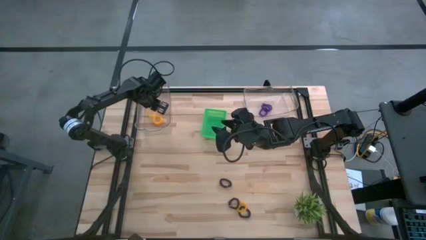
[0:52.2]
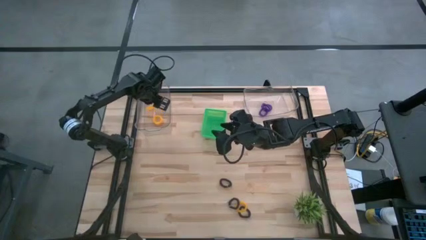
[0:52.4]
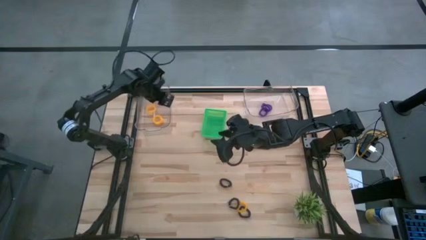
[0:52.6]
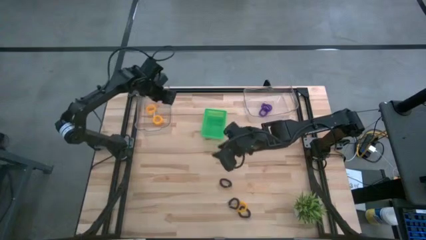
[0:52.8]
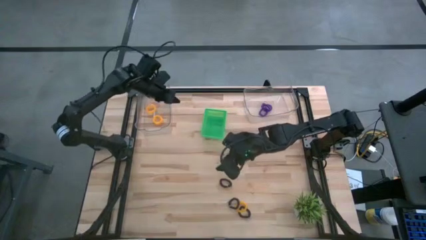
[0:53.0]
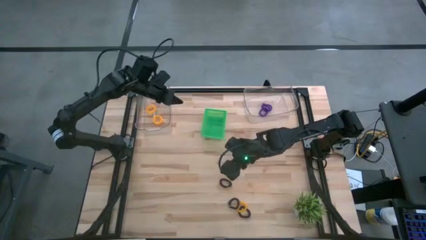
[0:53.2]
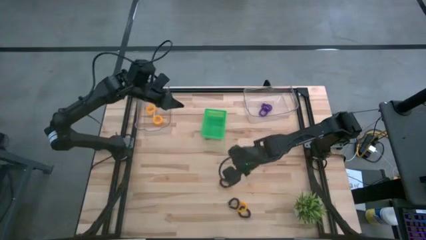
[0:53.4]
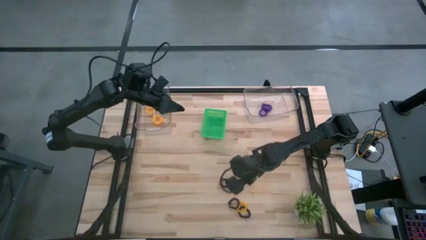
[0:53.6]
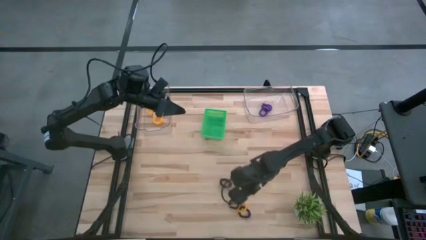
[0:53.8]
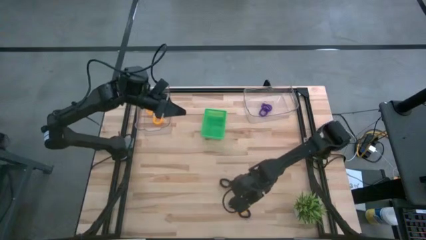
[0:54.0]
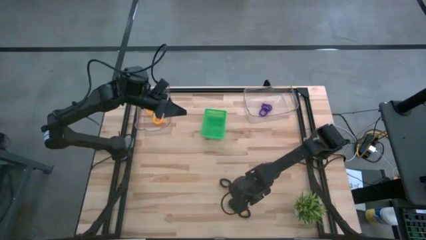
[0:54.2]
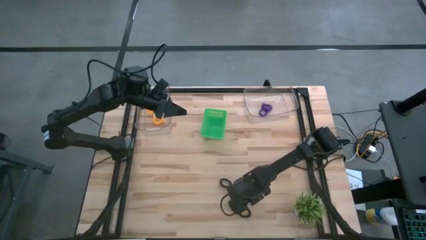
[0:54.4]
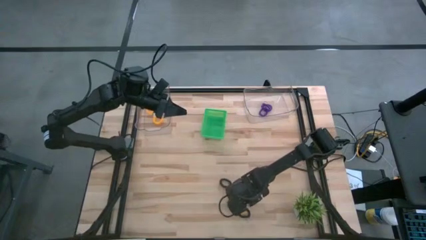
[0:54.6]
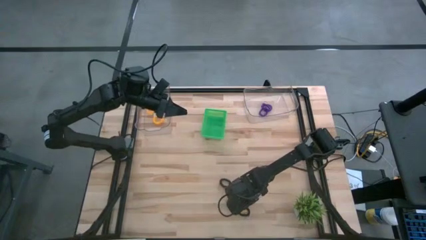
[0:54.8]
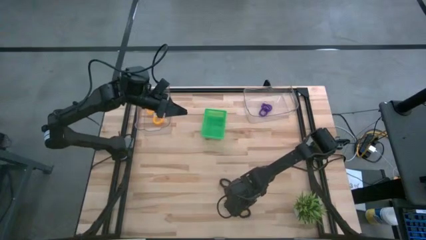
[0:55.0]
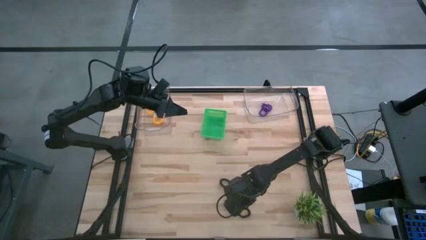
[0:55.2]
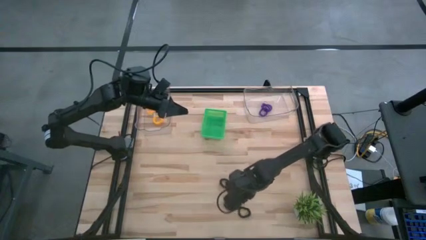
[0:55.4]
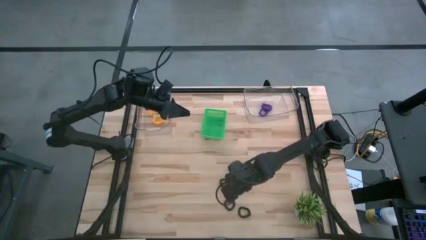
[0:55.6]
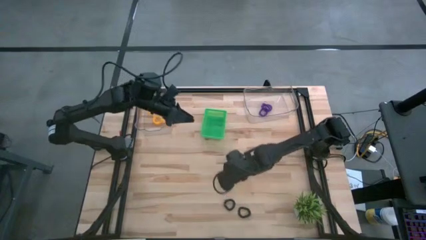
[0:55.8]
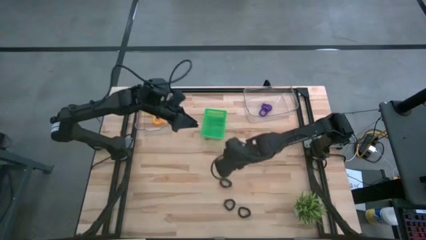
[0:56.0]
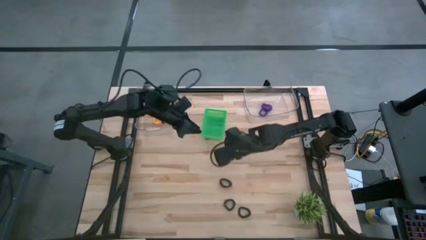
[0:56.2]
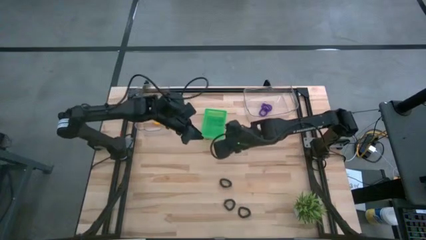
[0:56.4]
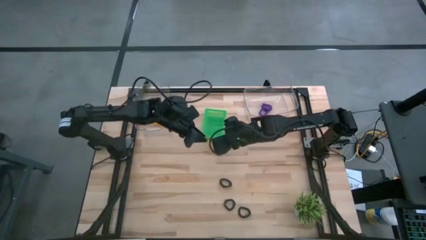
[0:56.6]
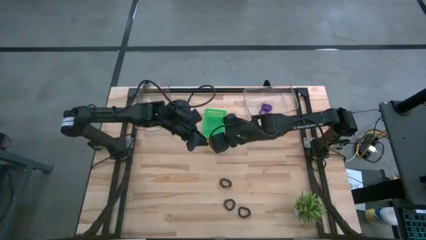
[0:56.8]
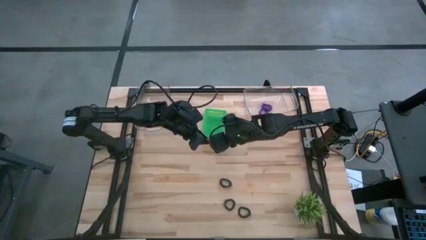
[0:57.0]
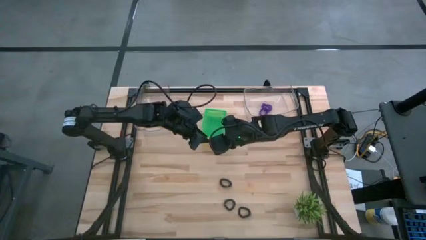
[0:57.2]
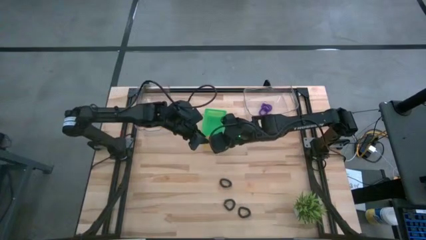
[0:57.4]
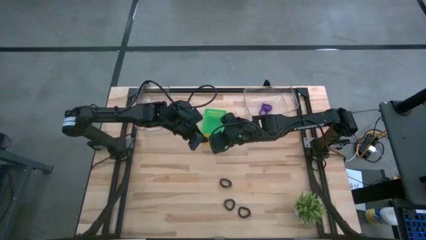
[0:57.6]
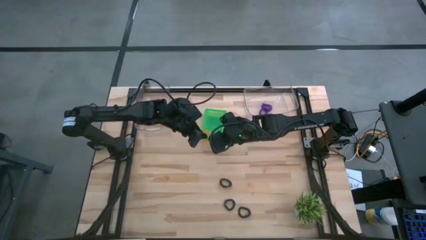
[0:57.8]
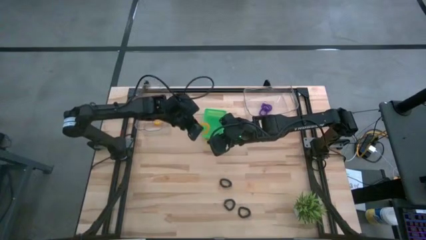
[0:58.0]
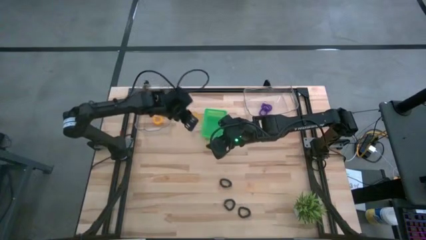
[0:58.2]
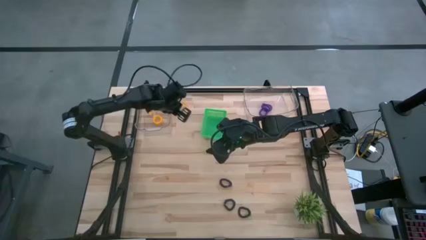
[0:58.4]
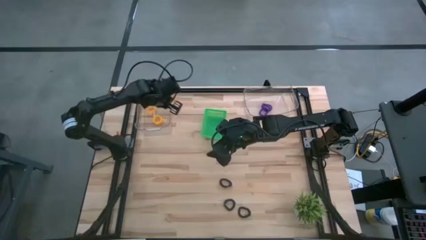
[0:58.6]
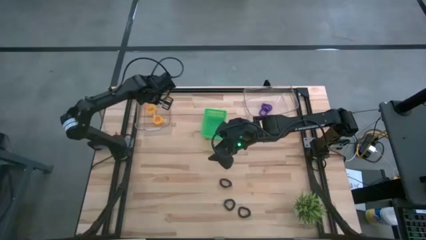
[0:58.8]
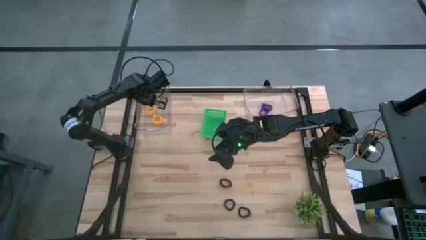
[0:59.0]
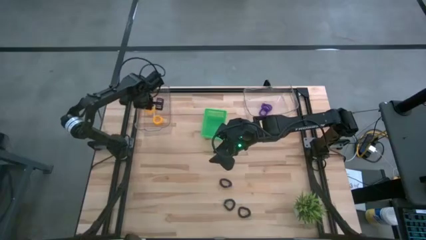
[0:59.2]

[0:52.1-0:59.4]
Task: Sort spring keychains
Put the yellow spring keychain into the left transparent bin

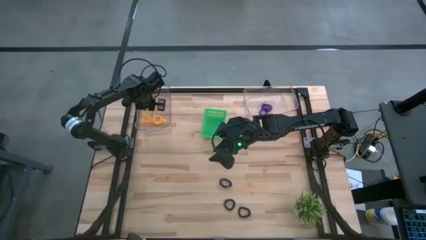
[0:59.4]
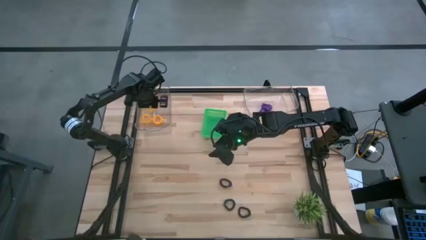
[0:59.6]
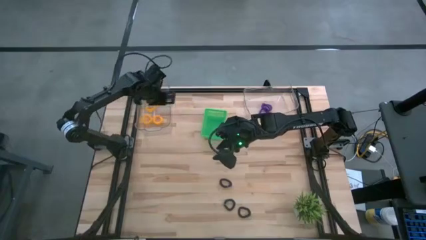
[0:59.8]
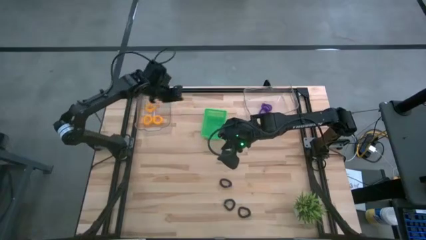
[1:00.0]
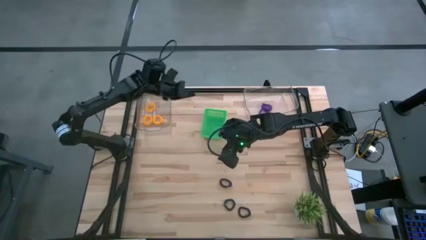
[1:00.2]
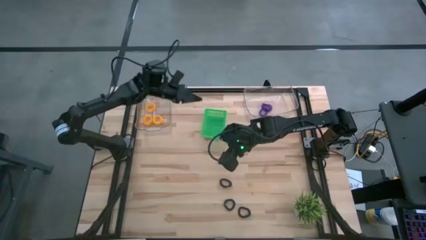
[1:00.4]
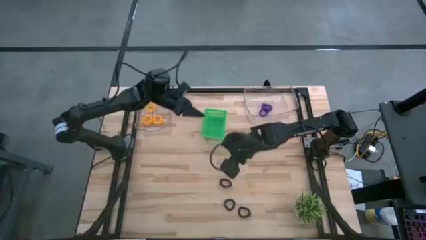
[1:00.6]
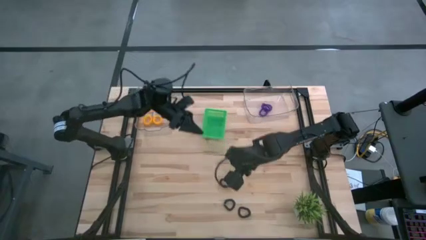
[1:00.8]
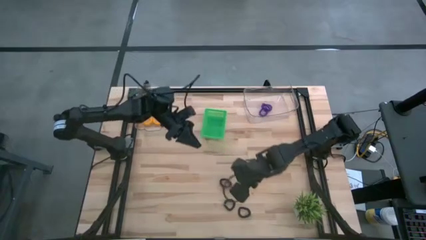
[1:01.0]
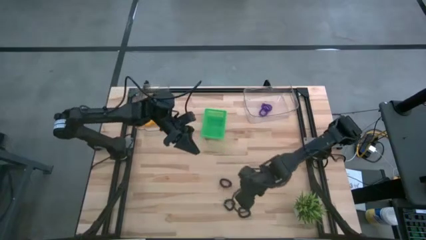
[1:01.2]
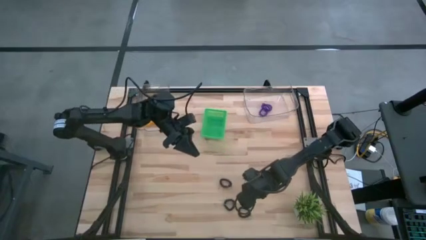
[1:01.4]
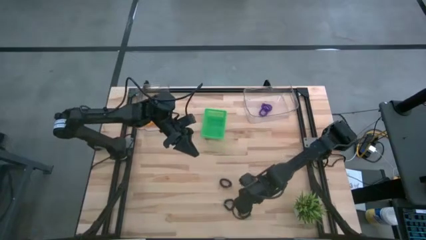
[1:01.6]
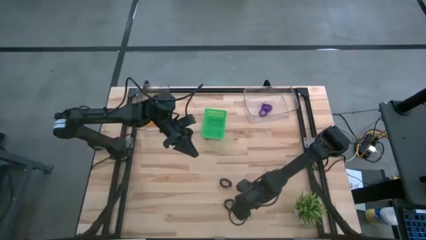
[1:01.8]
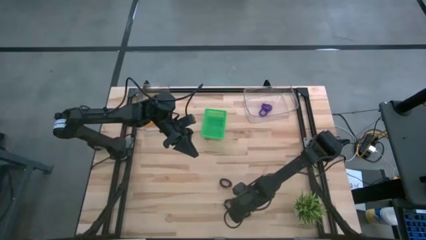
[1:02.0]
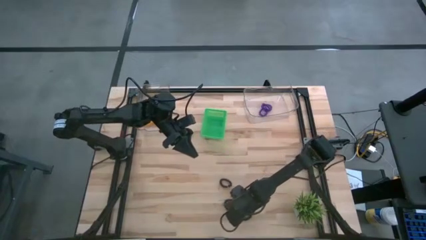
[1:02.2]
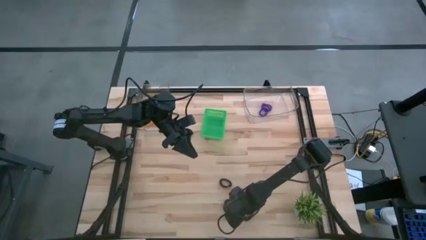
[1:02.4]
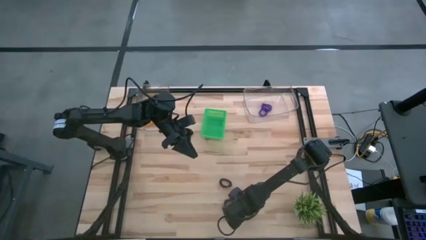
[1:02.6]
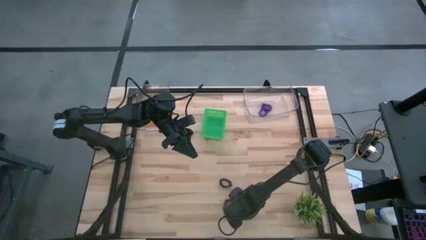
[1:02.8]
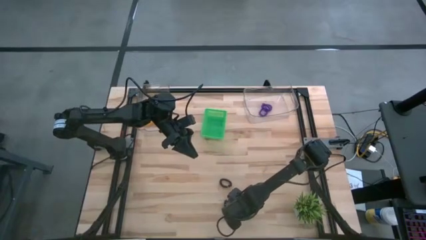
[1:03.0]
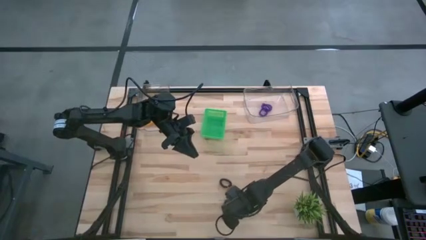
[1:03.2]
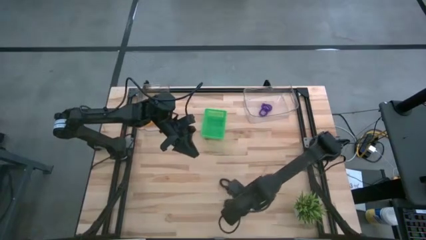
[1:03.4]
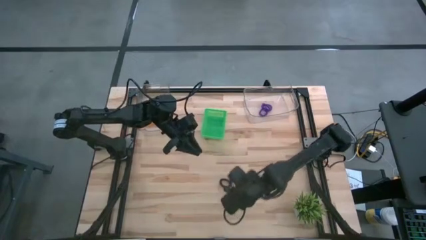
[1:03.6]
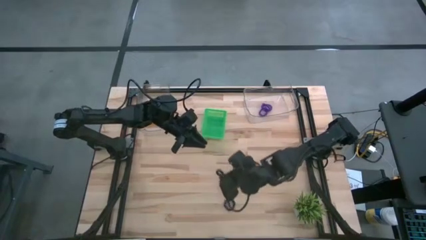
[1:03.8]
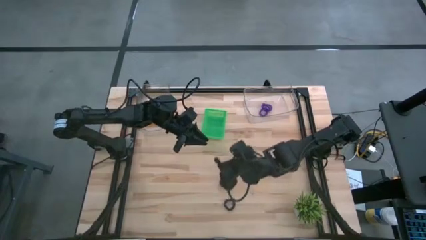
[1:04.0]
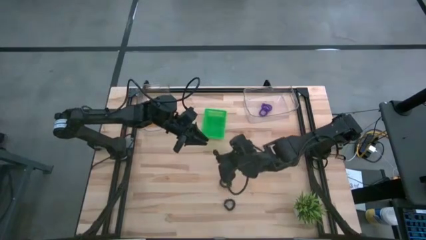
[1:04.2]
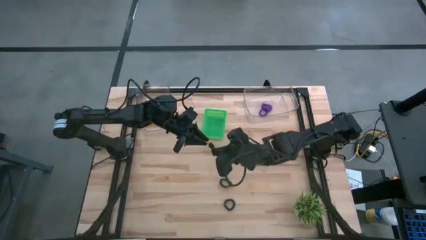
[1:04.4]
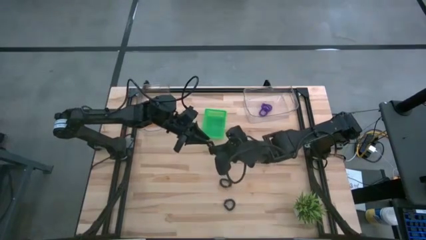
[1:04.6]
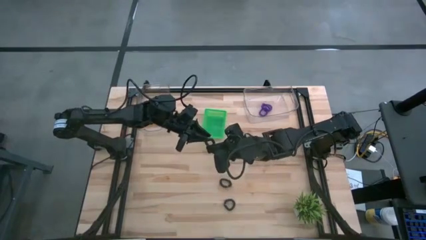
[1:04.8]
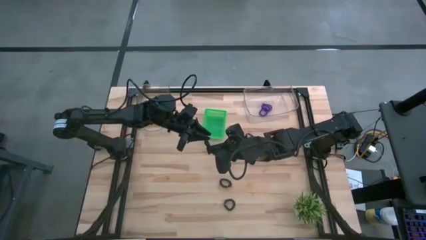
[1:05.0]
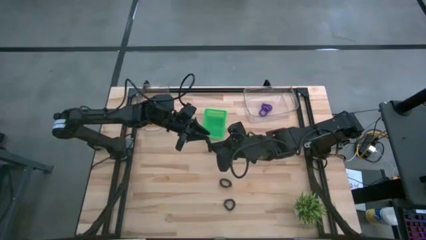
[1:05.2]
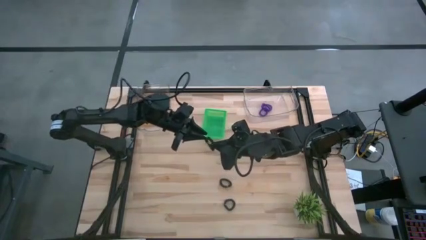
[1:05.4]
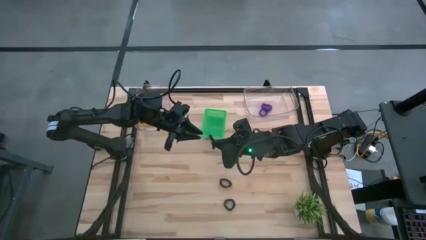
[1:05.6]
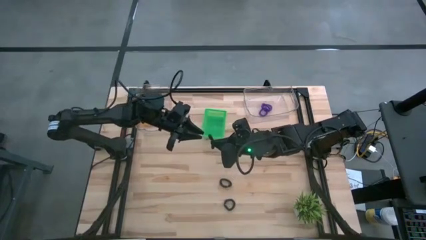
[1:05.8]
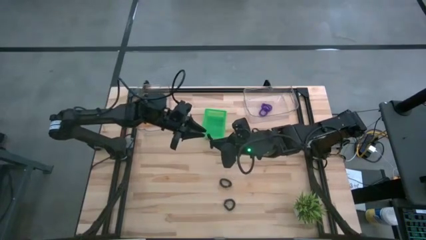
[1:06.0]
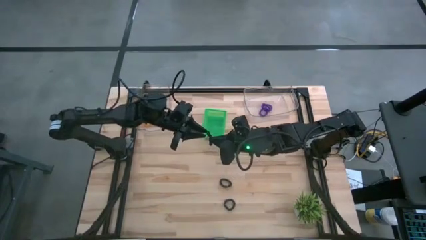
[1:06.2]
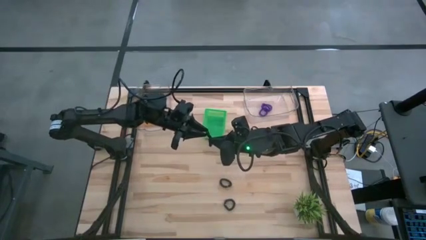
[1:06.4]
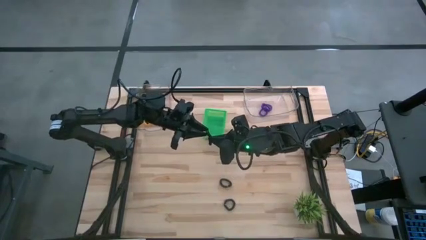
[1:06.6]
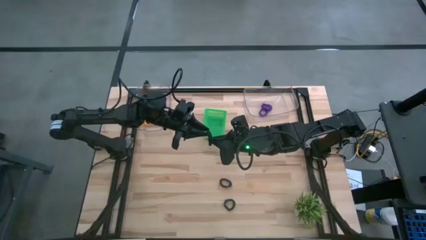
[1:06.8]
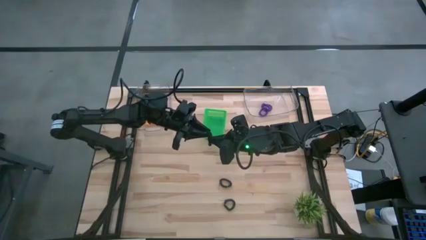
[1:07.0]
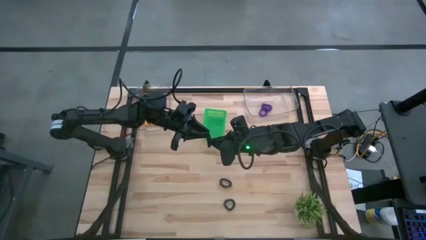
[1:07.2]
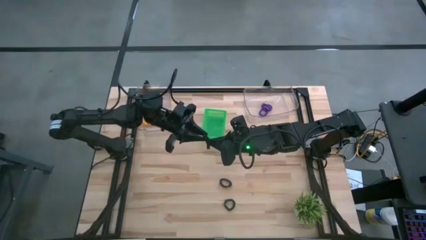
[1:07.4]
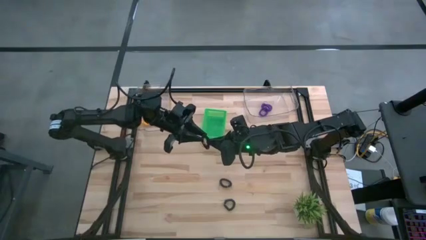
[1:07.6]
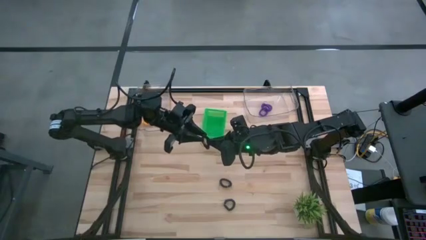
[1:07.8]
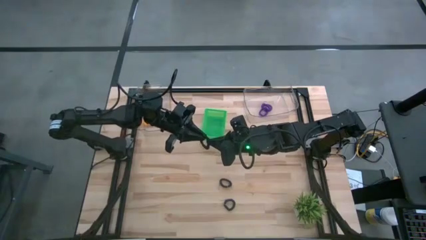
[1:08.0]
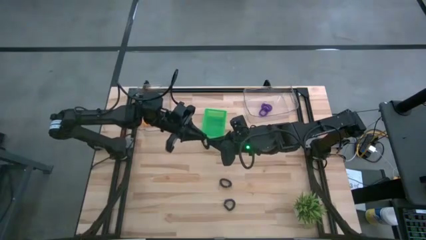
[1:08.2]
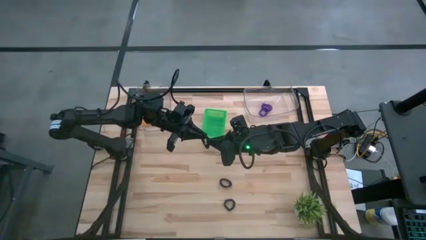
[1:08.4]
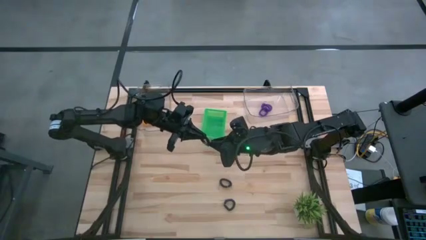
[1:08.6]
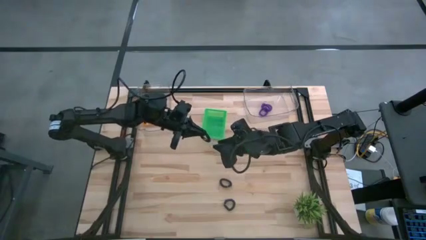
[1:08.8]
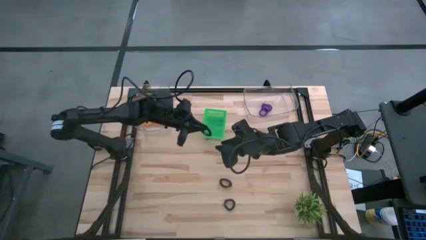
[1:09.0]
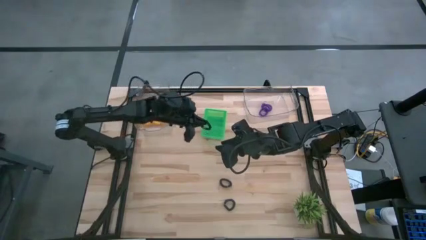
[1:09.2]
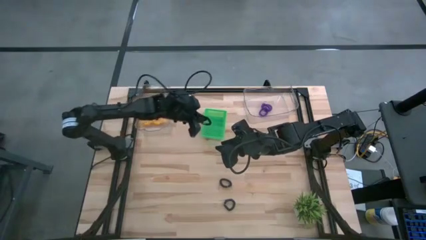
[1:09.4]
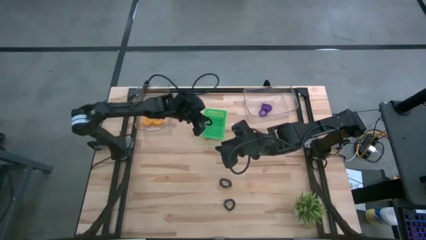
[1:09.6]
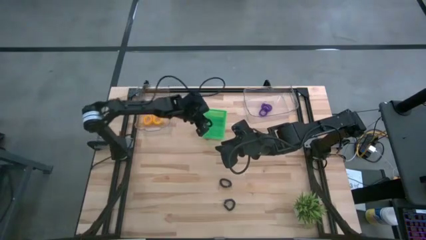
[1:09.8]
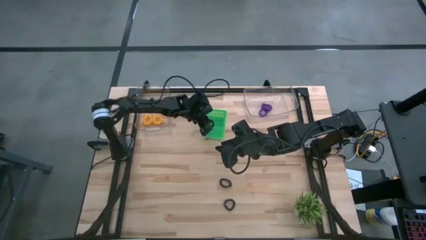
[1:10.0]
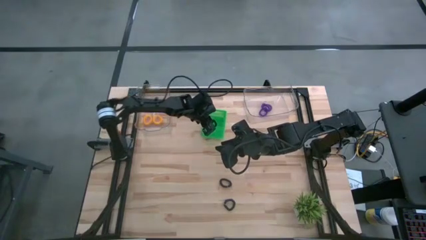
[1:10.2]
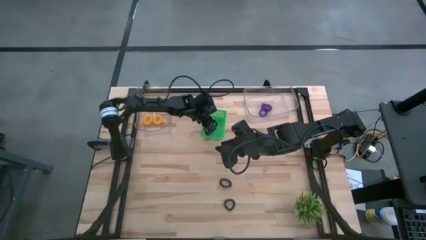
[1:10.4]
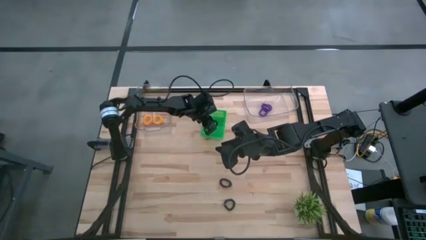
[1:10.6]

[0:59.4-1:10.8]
Put the bottom black spring keychain into the green bin
